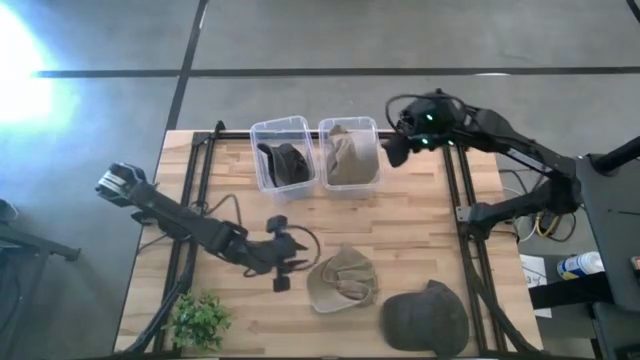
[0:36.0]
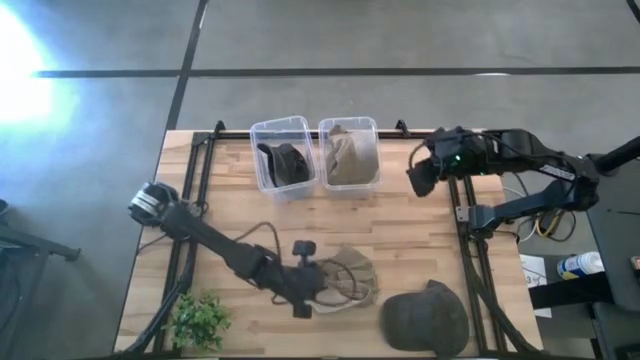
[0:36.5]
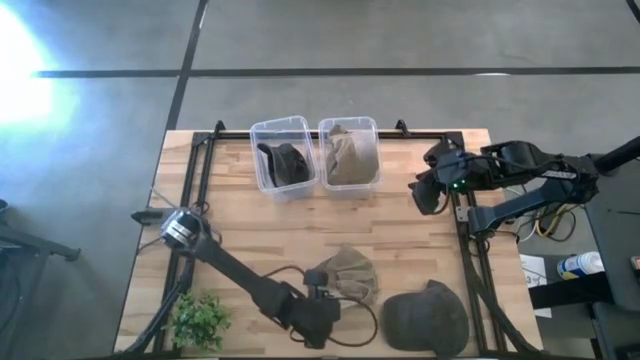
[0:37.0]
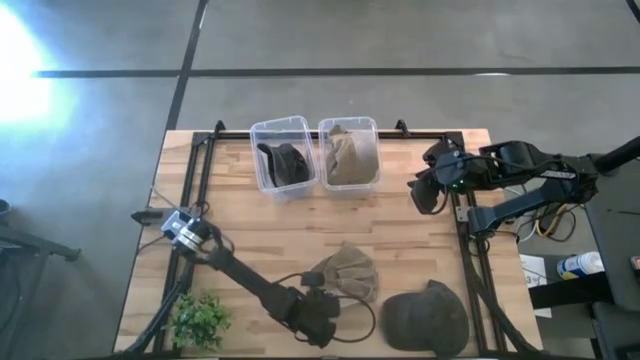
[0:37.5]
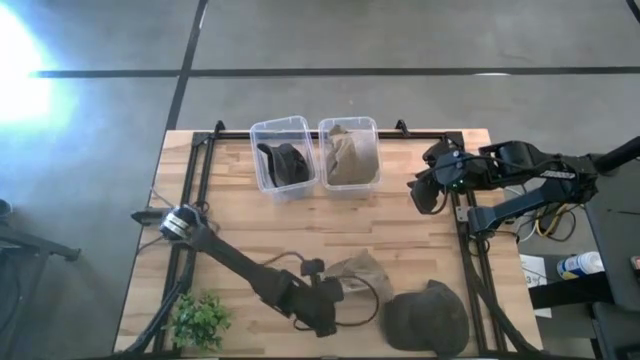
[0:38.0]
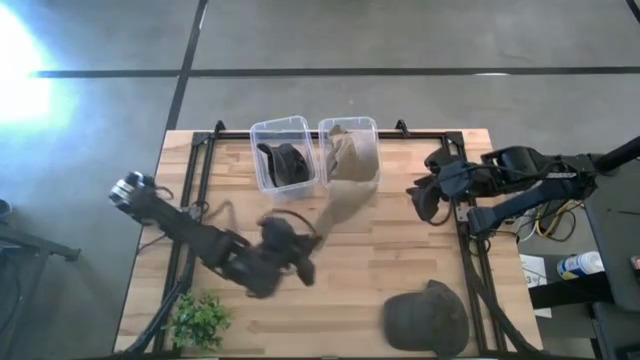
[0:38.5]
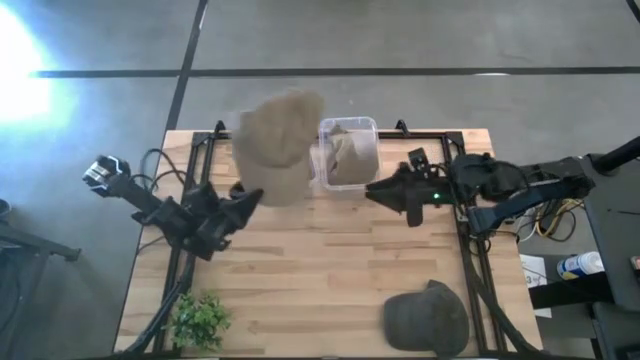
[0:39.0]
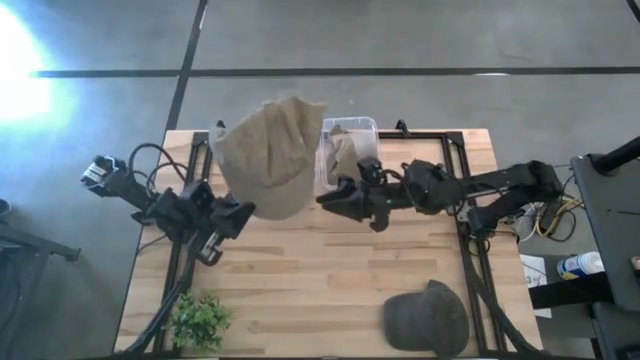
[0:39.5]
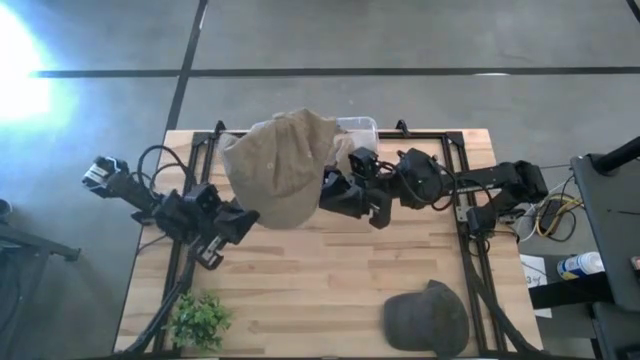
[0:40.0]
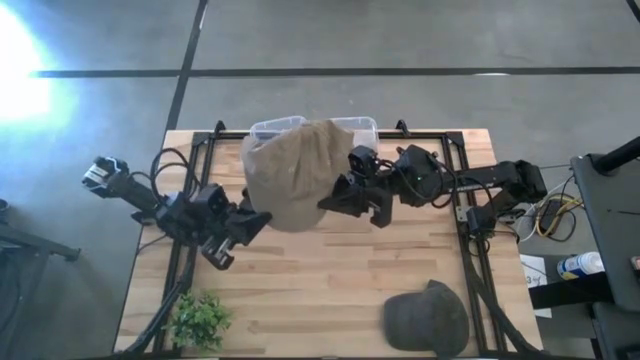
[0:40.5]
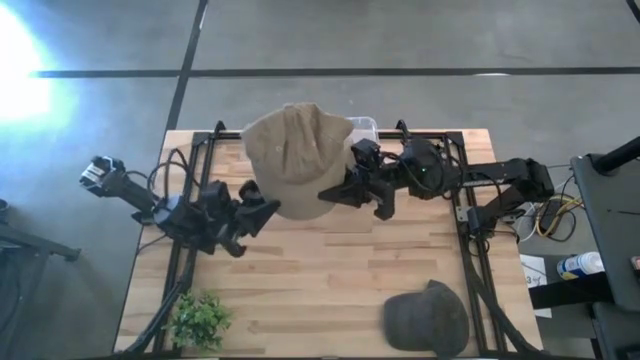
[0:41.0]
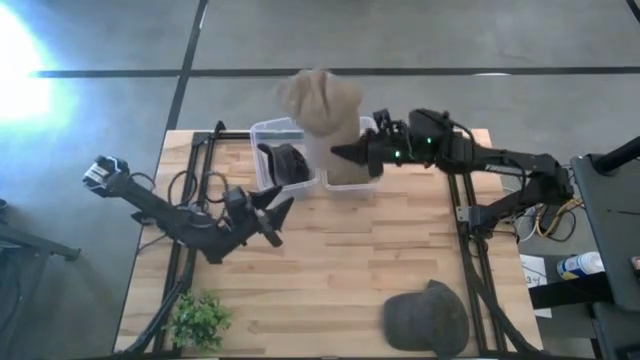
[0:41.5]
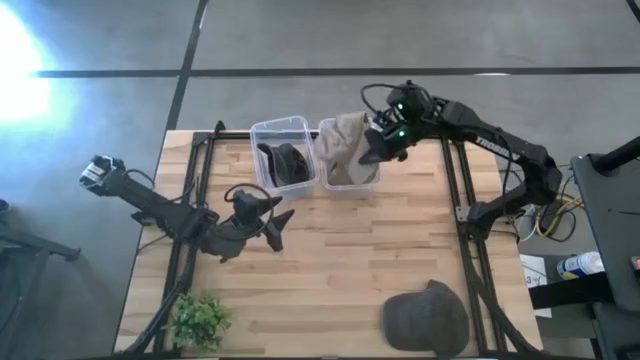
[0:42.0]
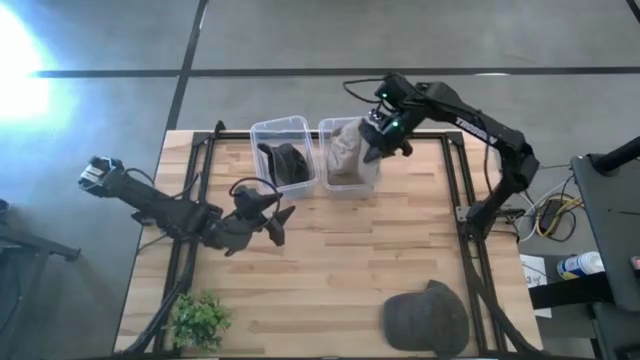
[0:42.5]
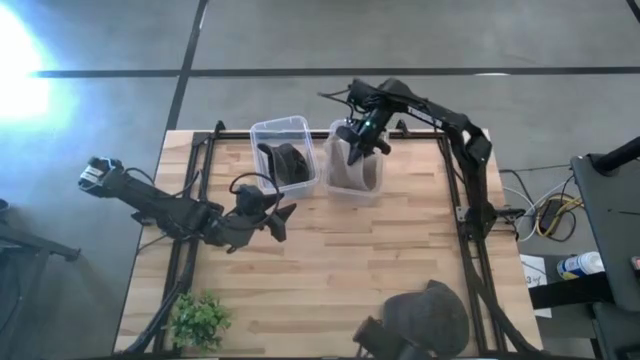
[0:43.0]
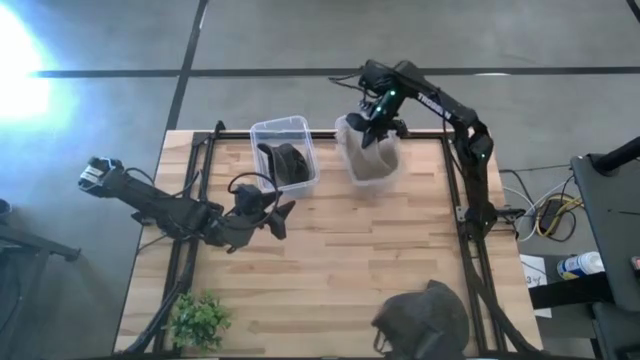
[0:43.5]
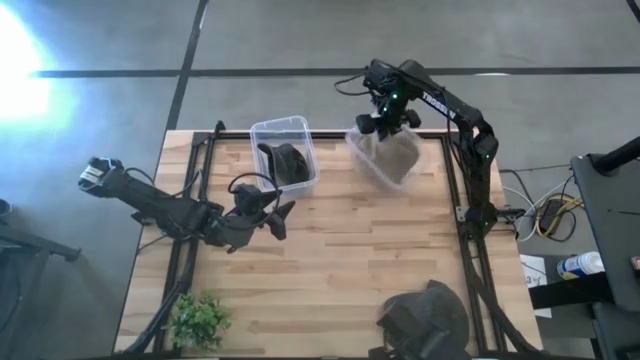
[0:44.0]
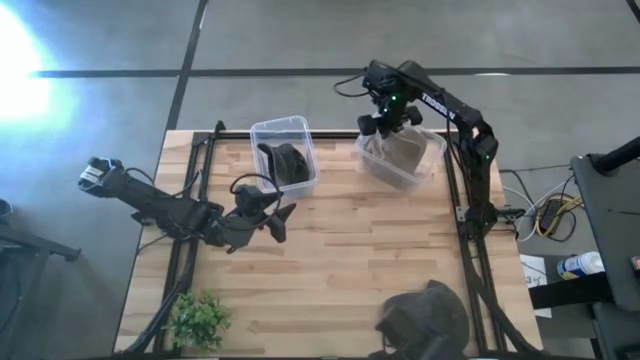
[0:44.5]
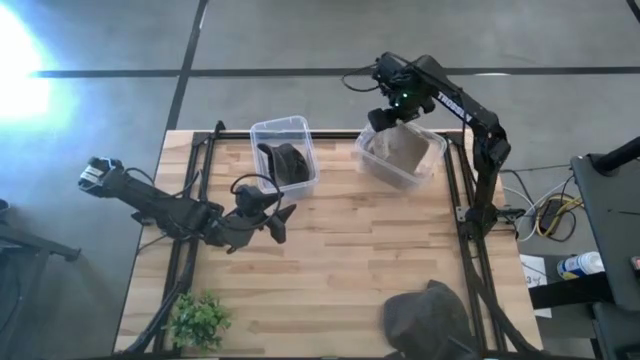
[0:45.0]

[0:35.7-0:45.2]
Task: Pick & Place hat
Put the brown cap into the right transparent bin

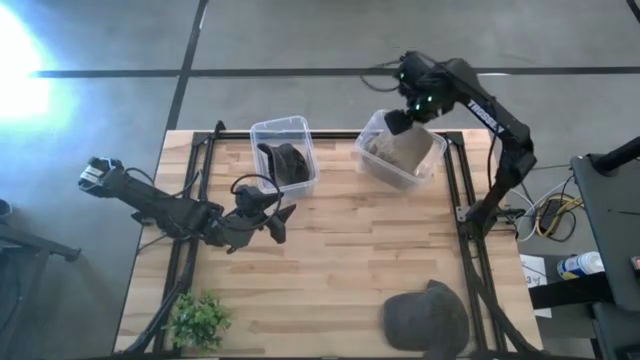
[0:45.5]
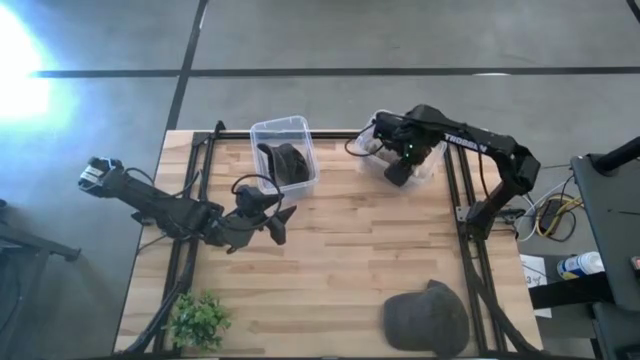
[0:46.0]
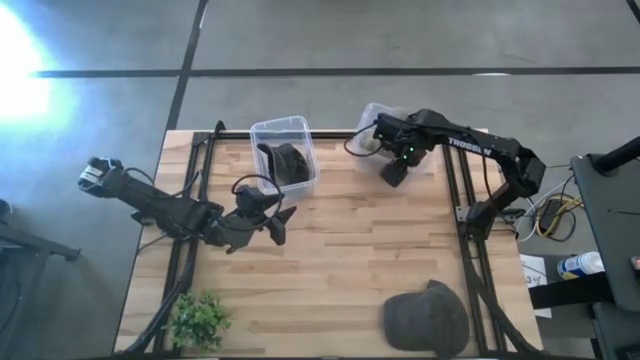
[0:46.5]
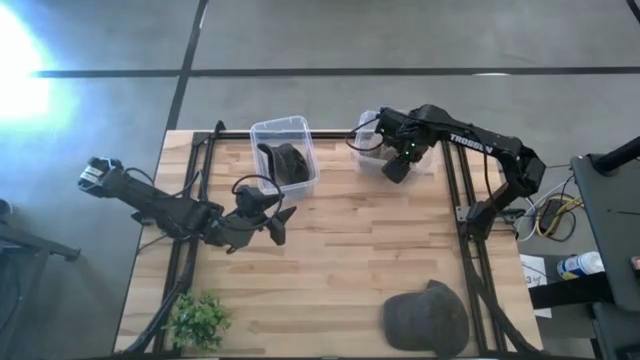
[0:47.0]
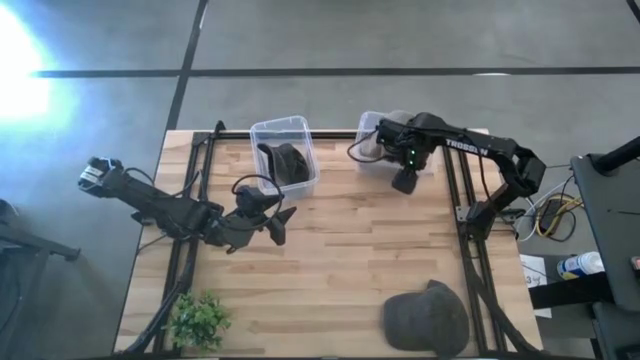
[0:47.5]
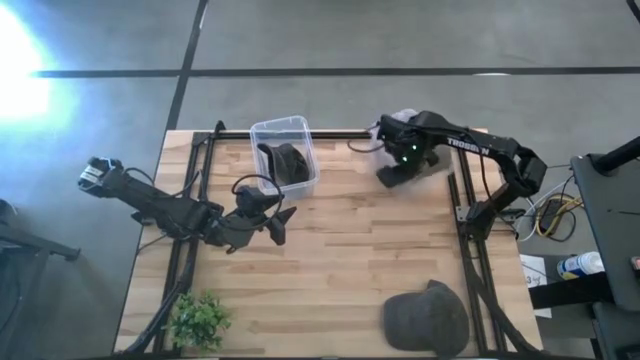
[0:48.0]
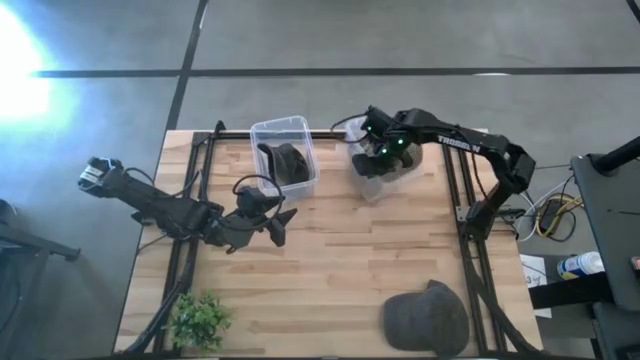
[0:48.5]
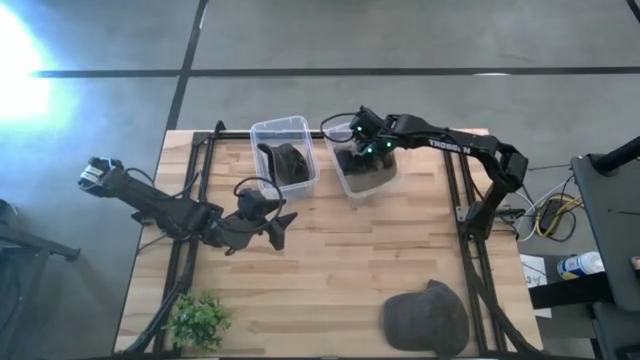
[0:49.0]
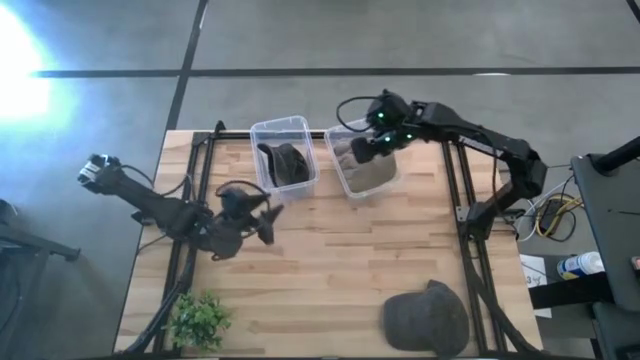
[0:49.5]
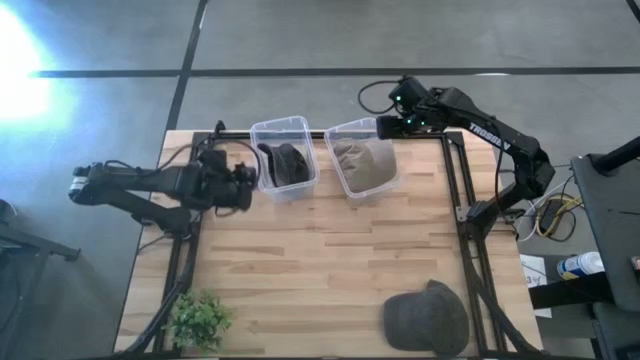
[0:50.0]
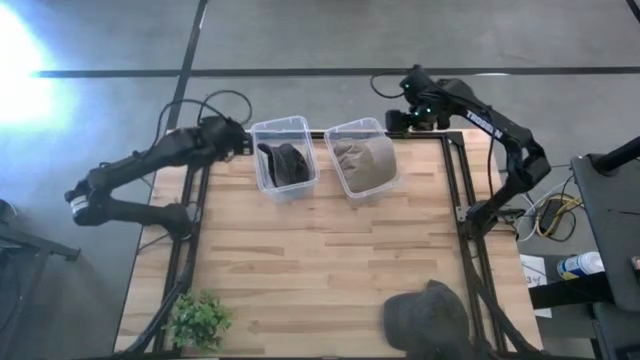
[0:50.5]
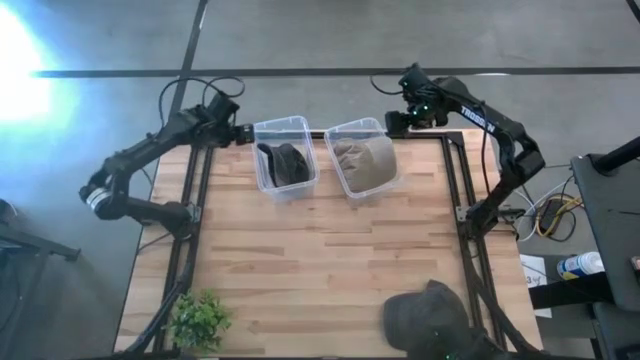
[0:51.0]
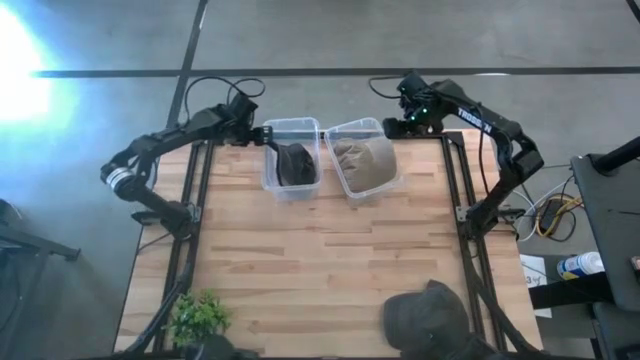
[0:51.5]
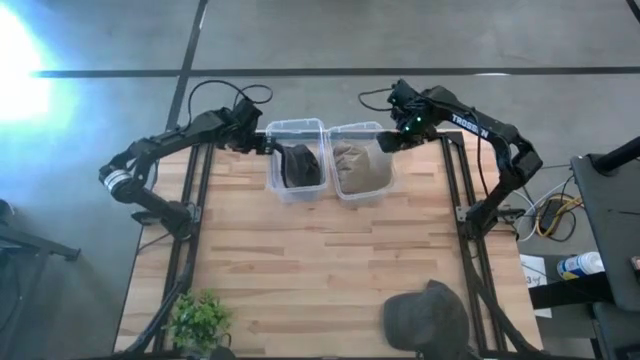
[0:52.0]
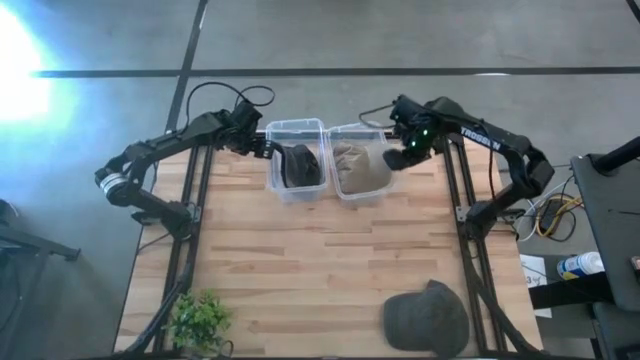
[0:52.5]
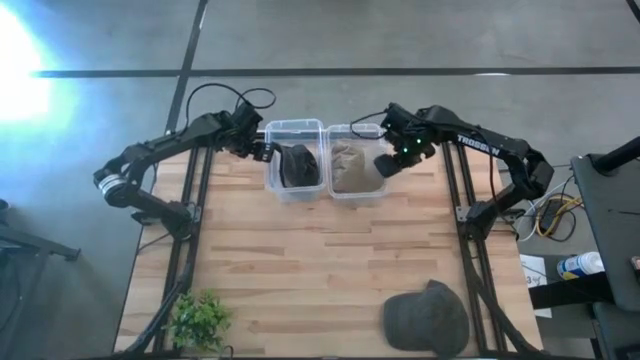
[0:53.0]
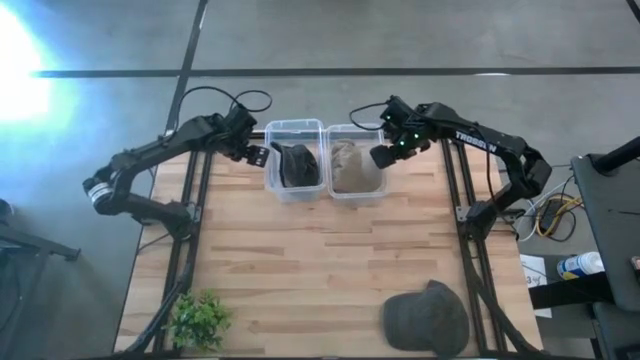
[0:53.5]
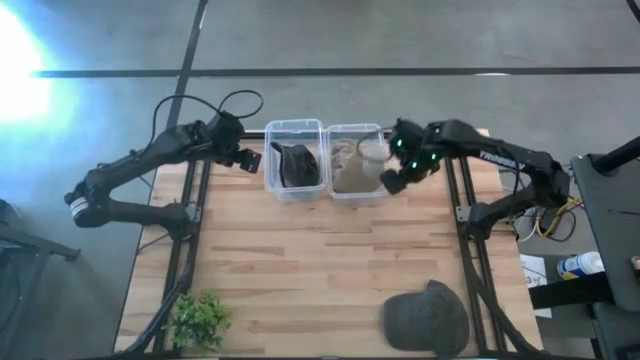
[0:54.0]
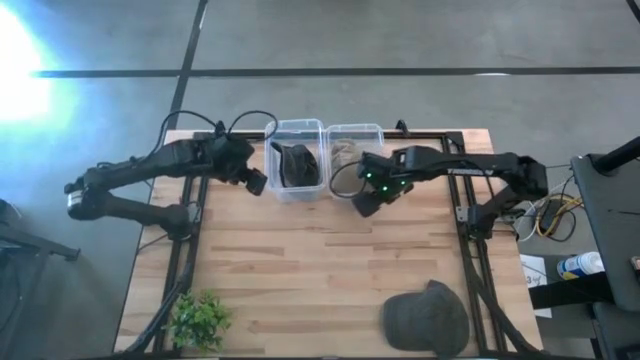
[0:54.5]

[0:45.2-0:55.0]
Adjust the transparent bins

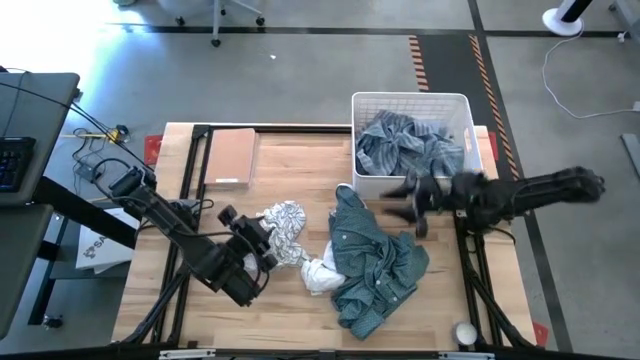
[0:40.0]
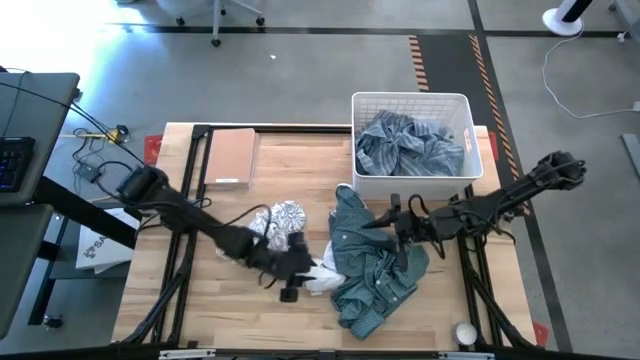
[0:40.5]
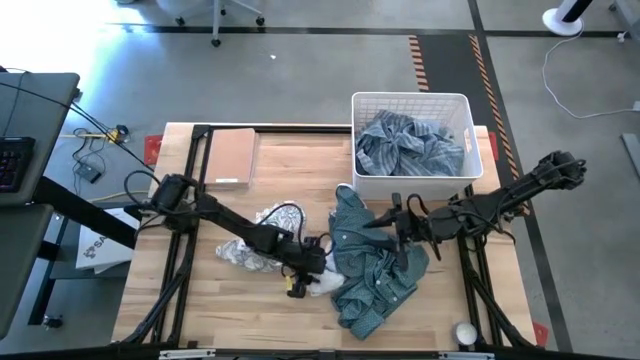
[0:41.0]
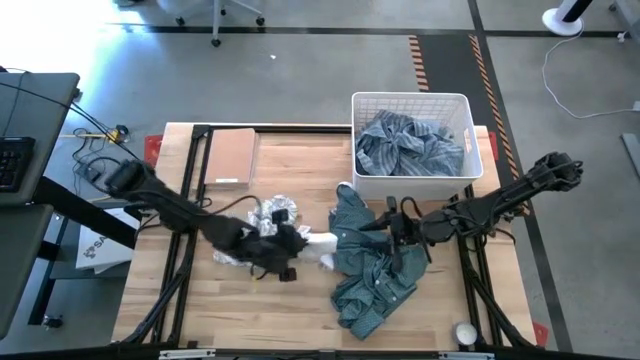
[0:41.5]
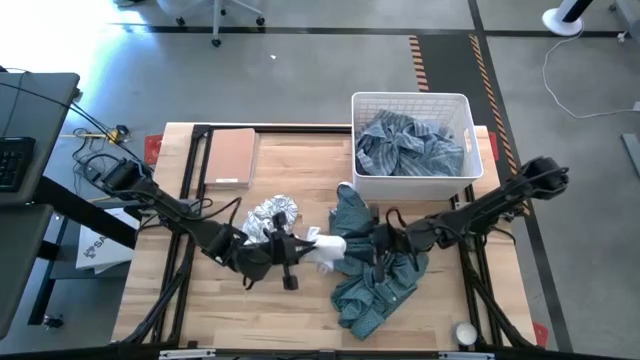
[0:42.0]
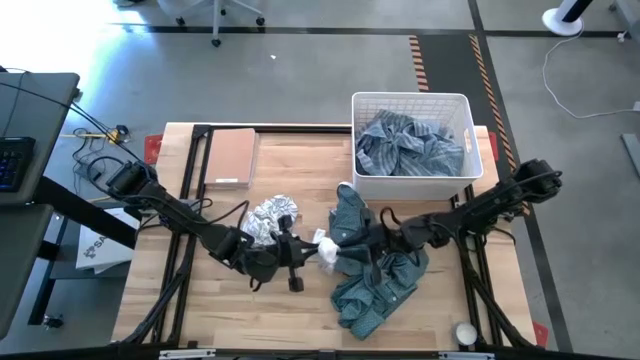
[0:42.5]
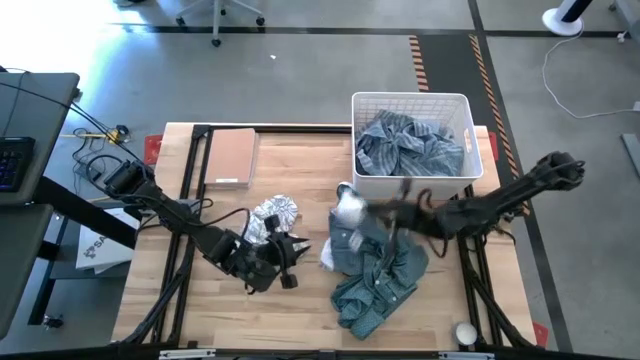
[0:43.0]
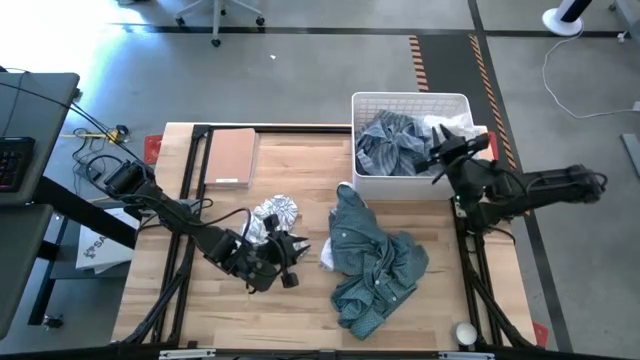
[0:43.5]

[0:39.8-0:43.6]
Task: Sort clothes
Put the white socks into the white laundry bin
